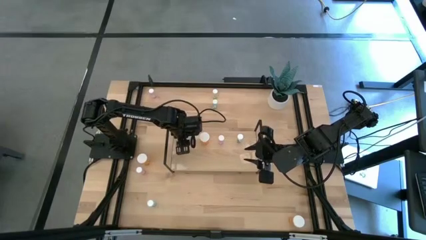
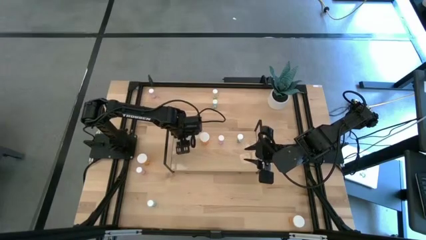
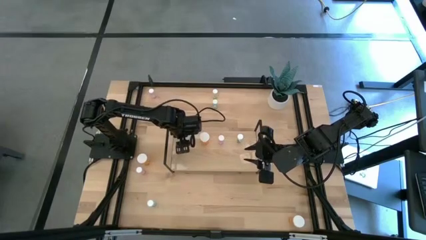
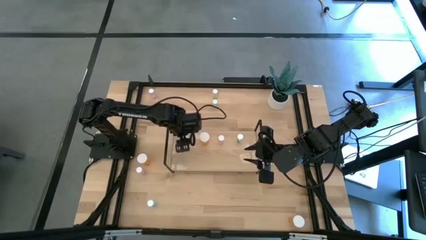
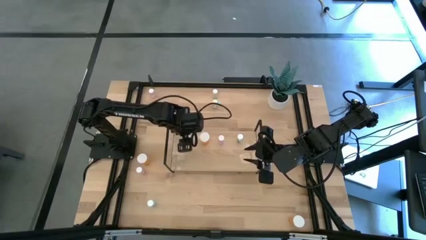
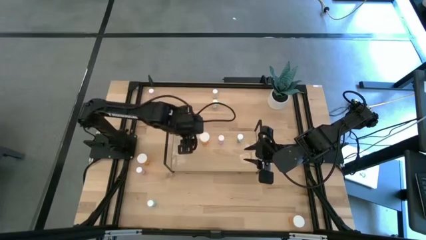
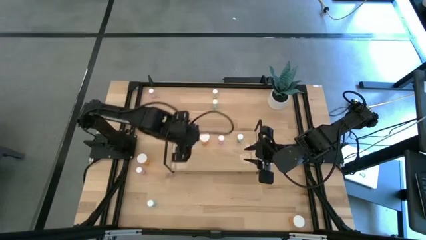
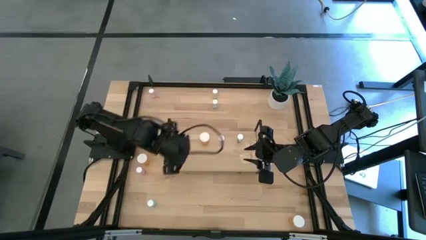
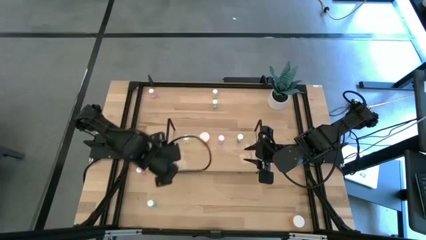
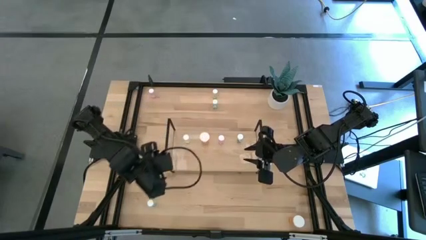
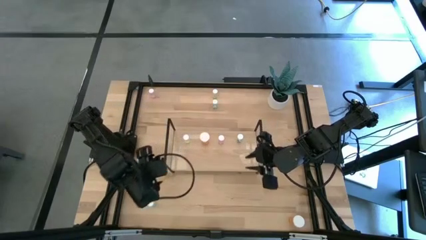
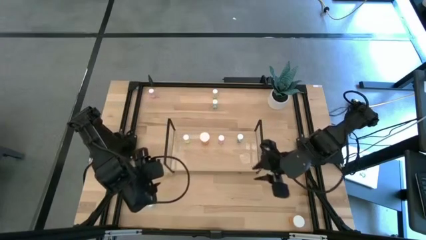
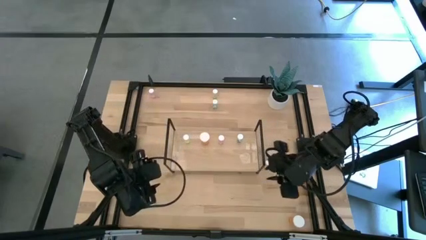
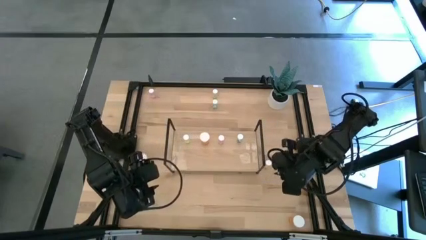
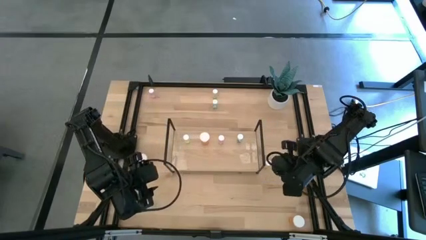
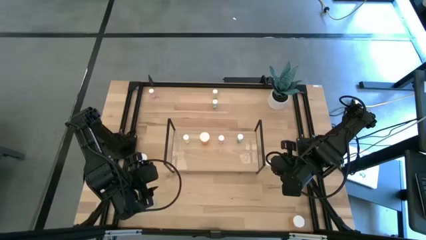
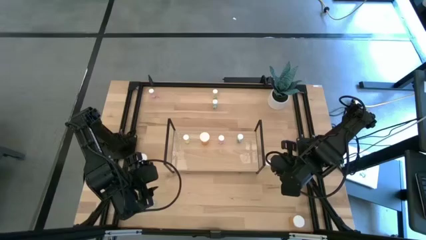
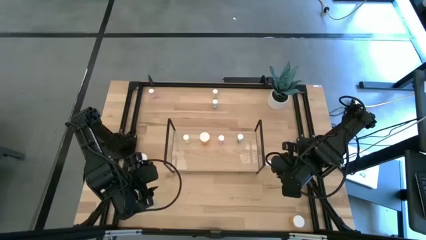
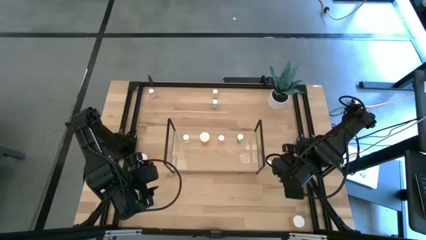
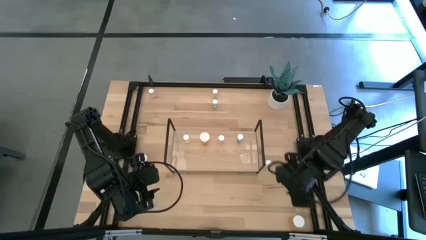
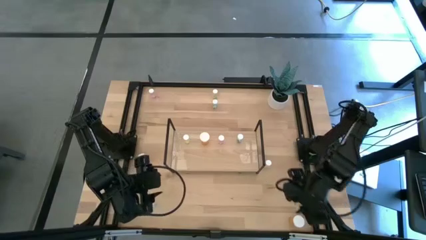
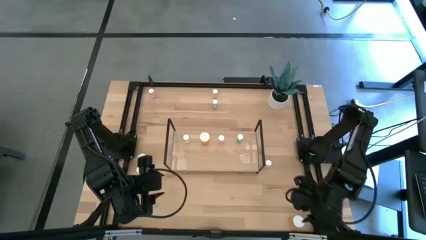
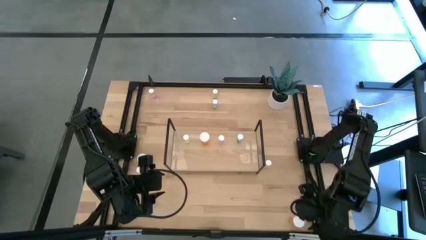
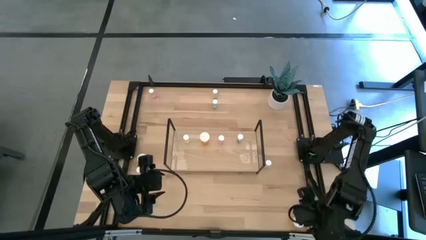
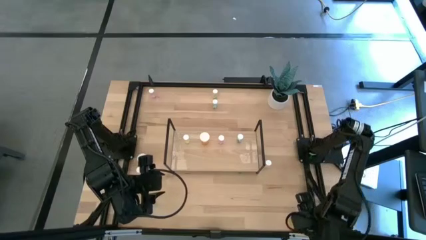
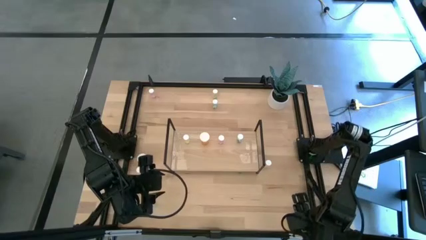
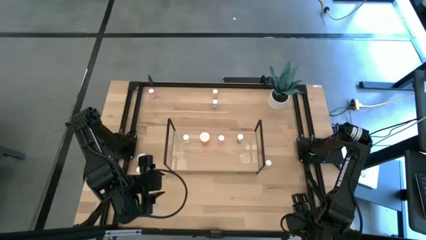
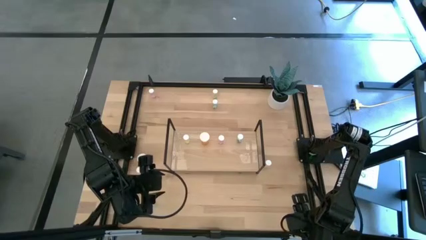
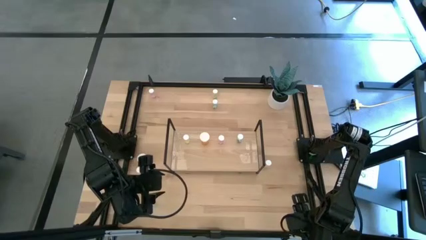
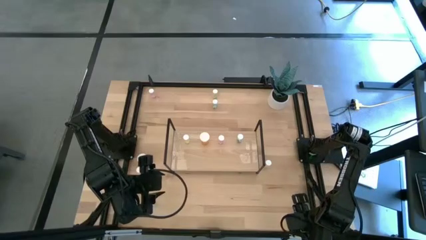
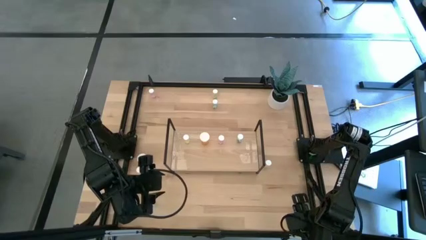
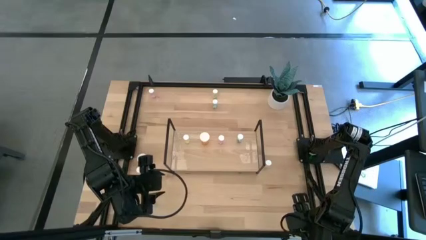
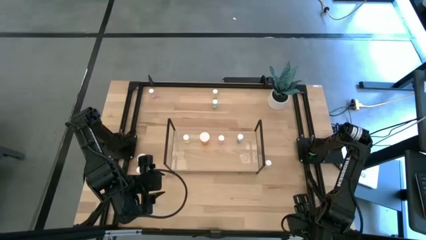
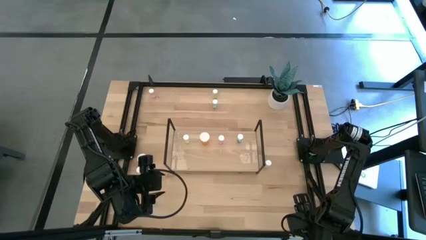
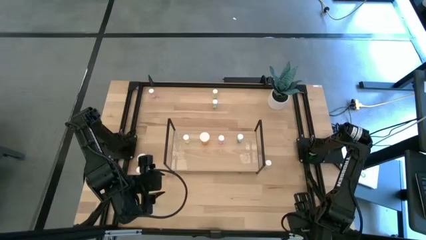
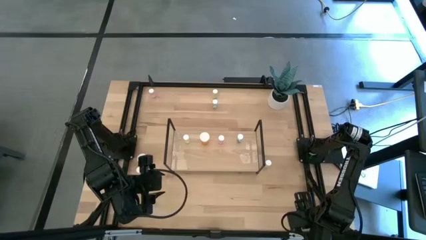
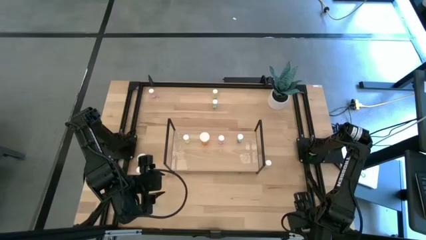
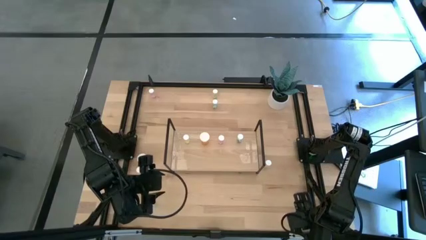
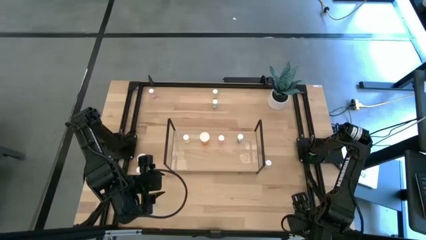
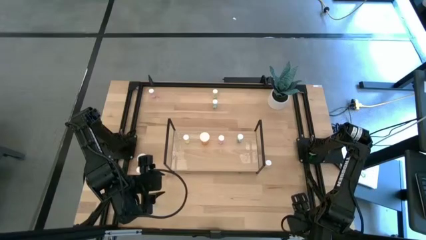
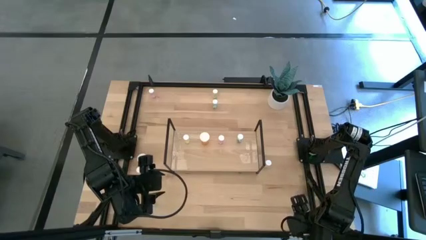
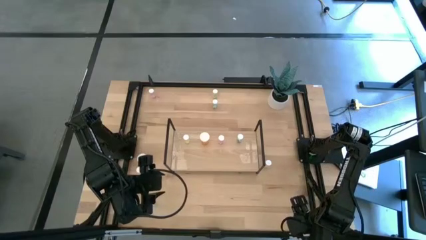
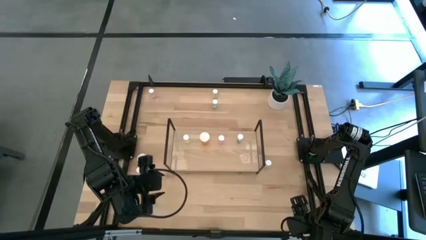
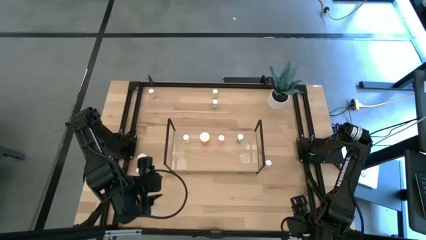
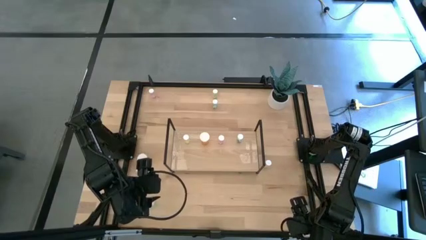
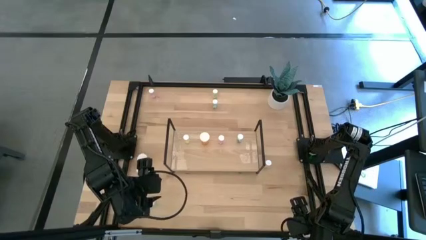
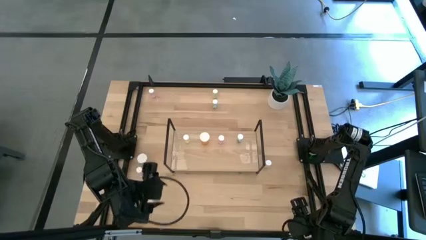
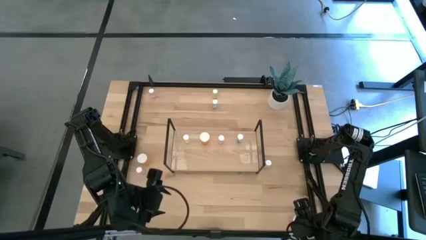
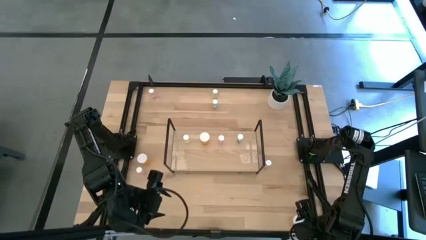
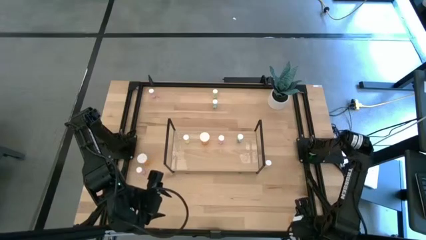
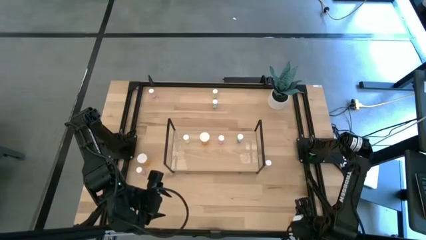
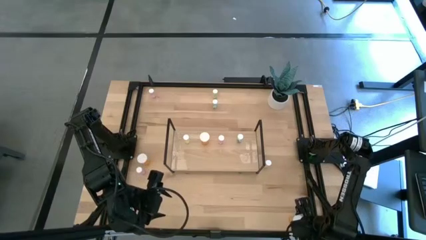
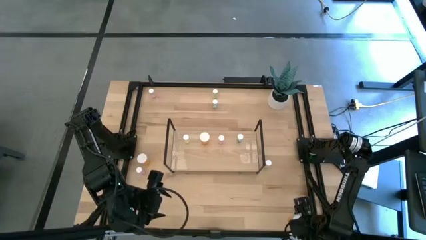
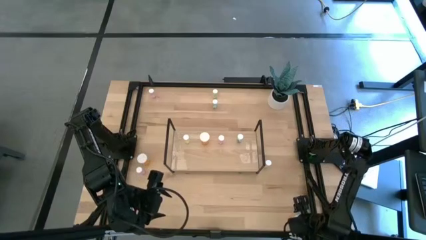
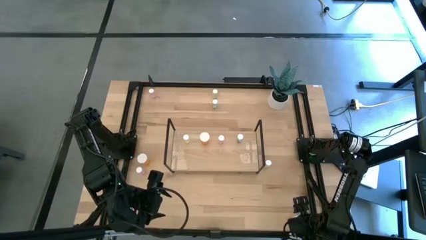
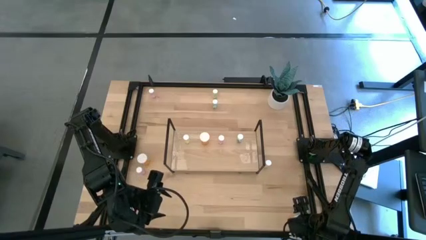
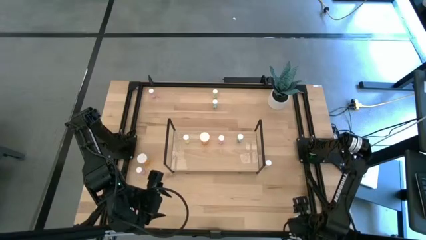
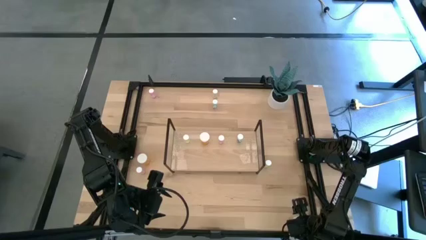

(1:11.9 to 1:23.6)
Task: Pick and place medicine bottles onto shelf by color
Put the bottom orange pill bottle aligned with the orange pill bottle on the shelf

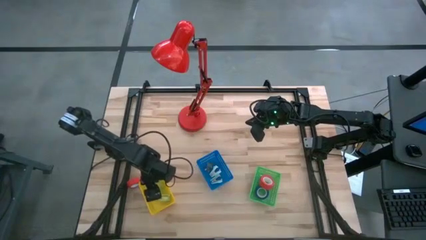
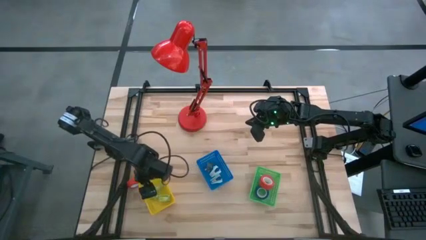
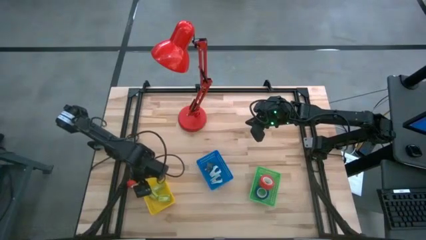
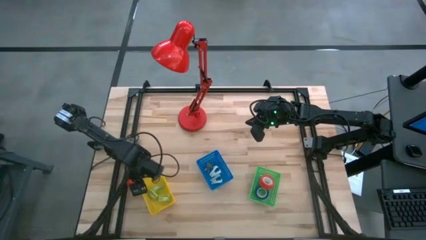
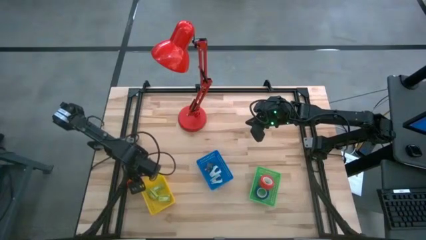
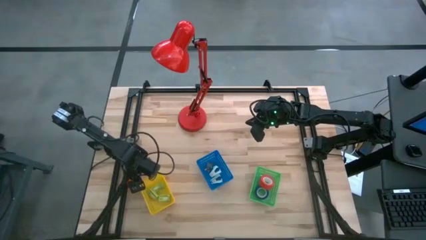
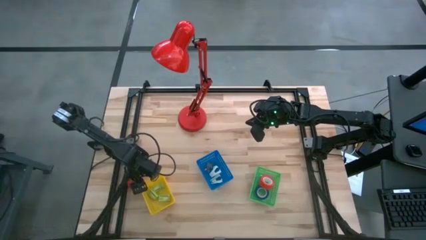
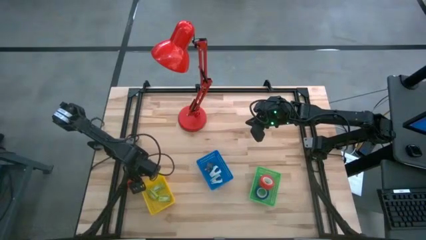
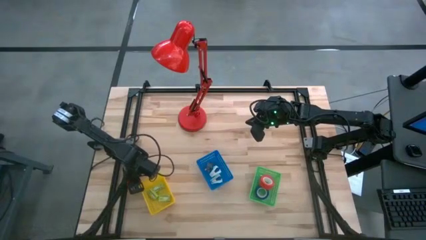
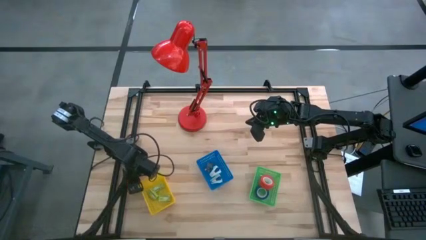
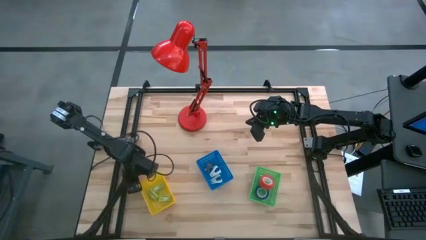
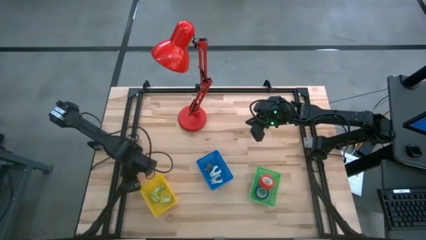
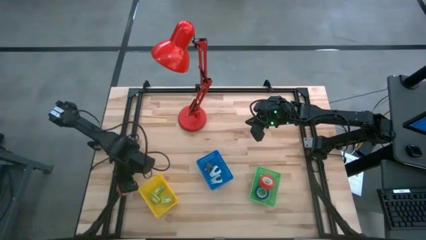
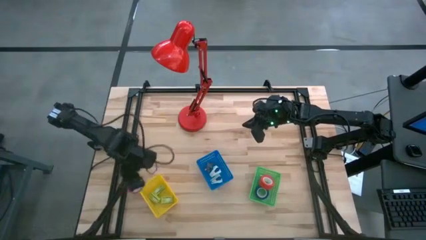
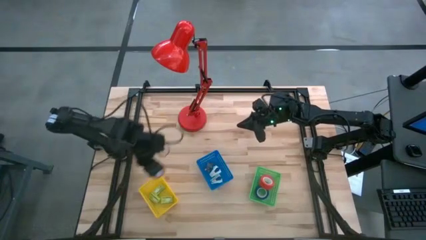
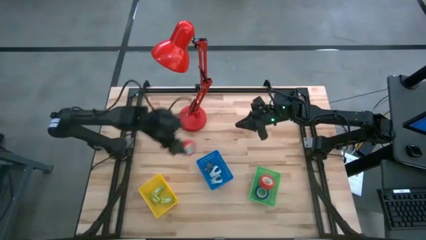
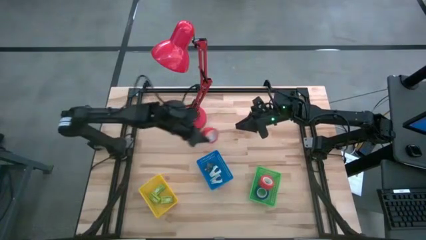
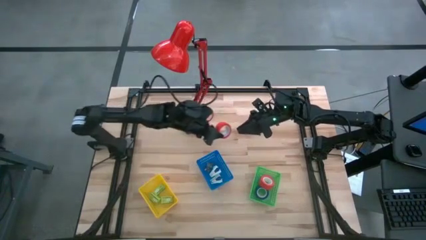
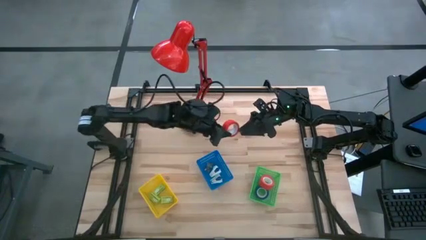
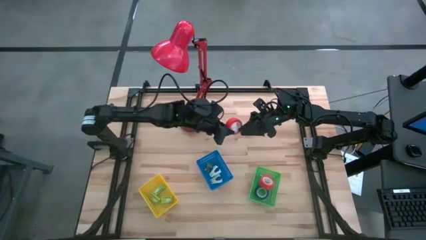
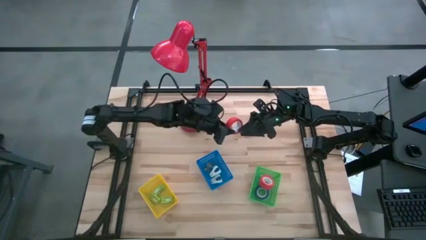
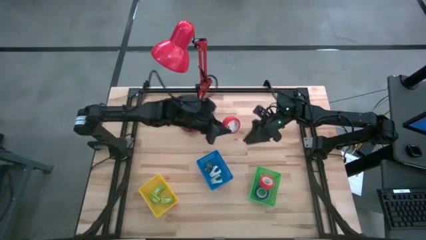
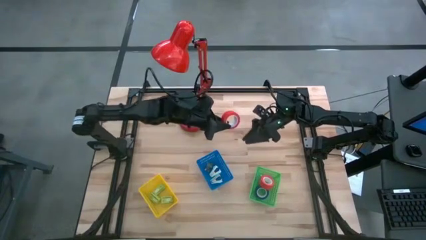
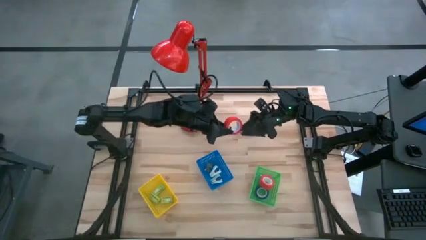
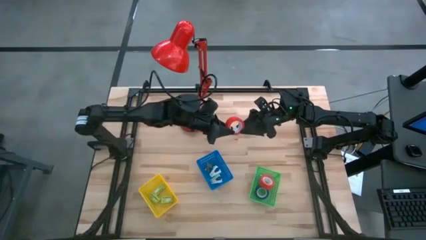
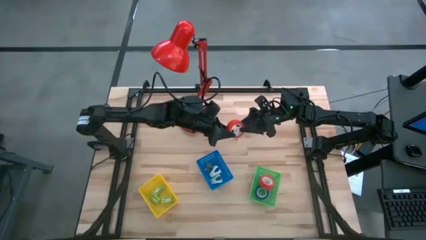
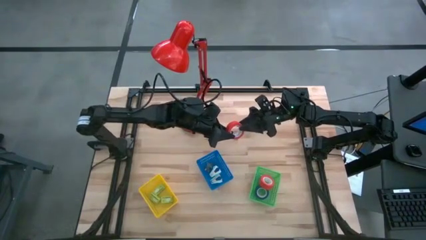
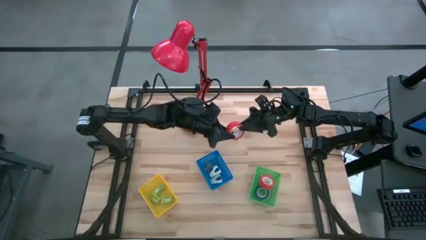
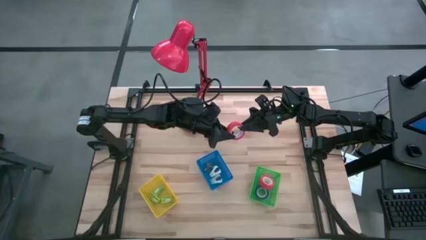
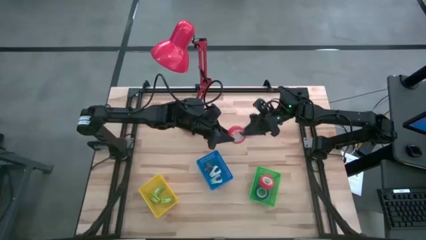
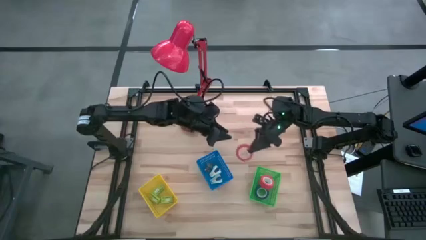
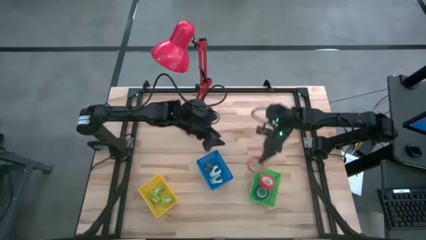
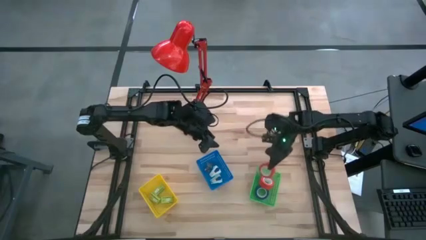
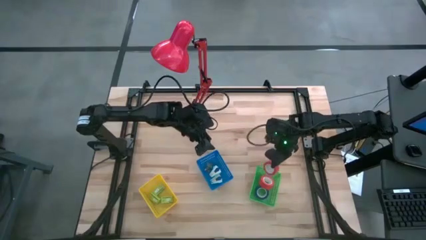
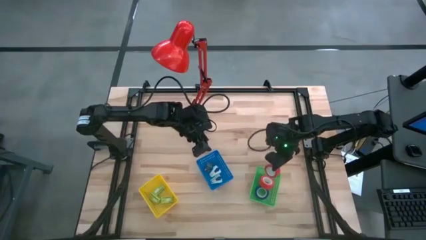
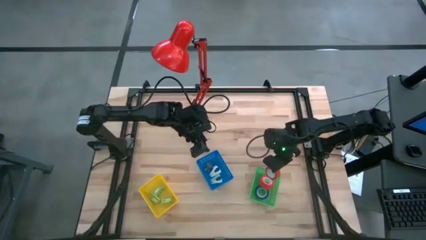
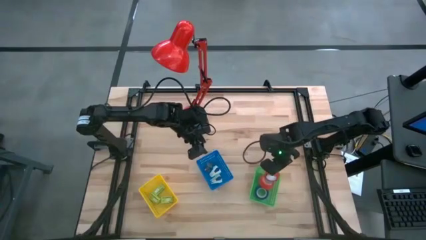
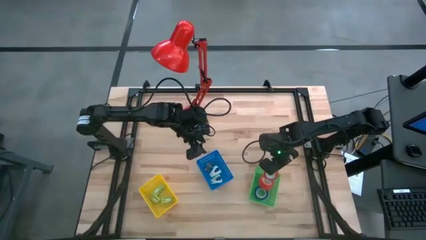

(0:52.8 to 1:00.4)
Task: Pick and place Stapler, Stapler remover, tape
Put the orange tape into the green bin
